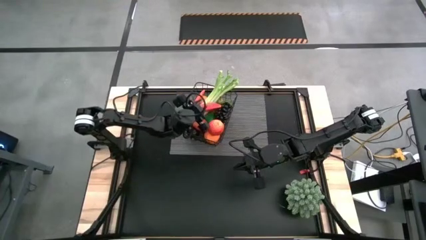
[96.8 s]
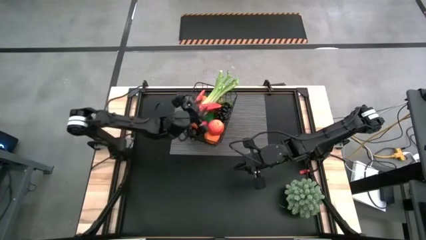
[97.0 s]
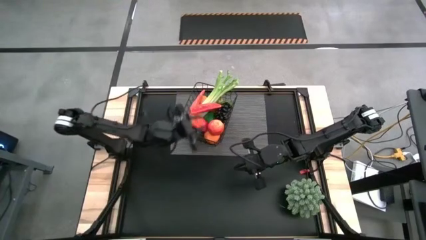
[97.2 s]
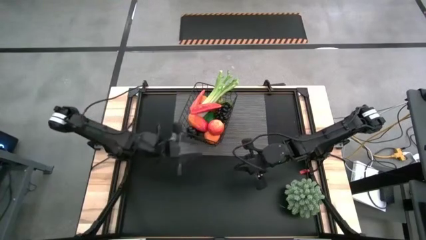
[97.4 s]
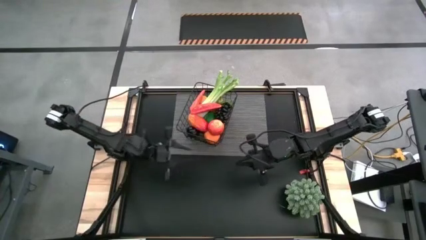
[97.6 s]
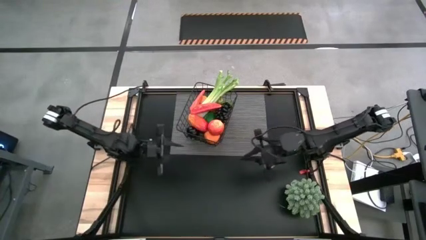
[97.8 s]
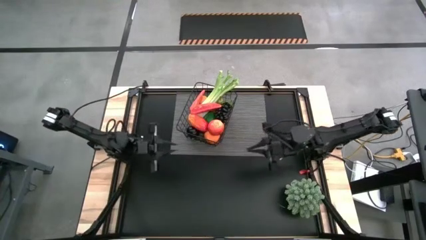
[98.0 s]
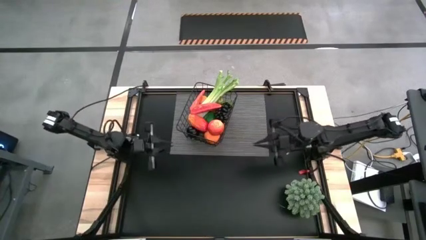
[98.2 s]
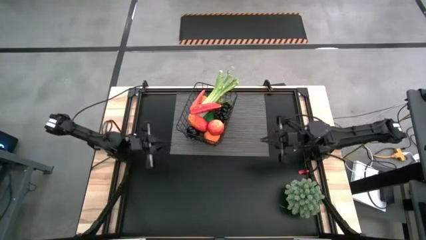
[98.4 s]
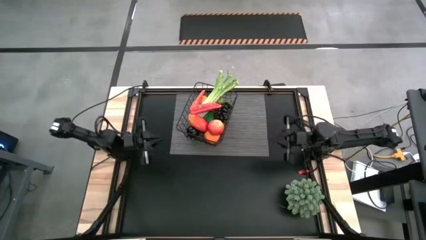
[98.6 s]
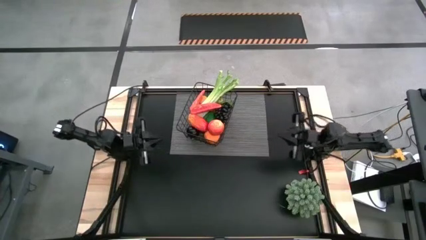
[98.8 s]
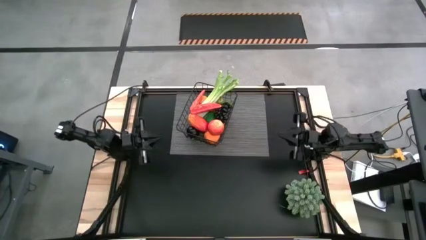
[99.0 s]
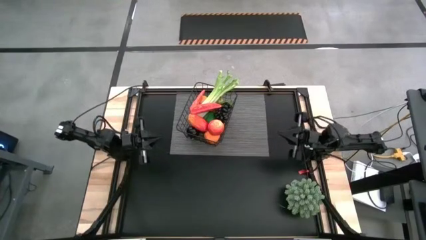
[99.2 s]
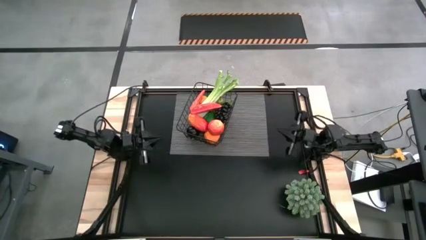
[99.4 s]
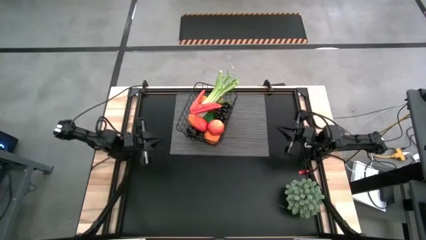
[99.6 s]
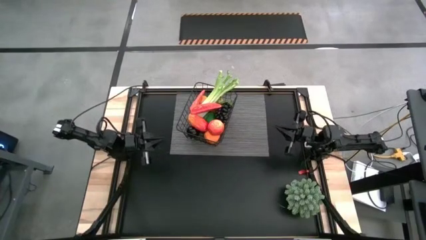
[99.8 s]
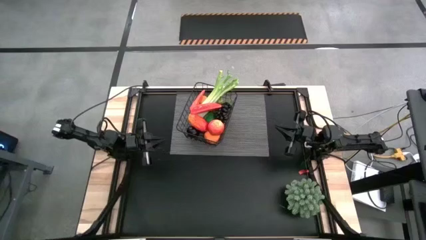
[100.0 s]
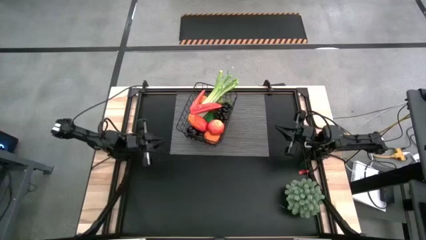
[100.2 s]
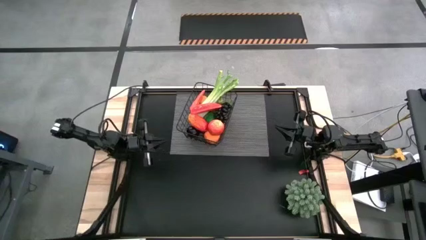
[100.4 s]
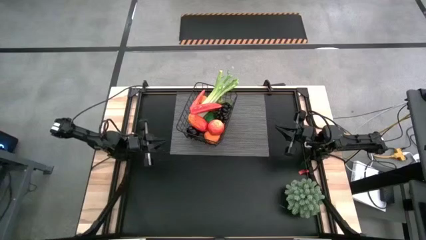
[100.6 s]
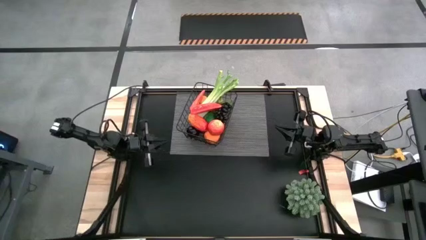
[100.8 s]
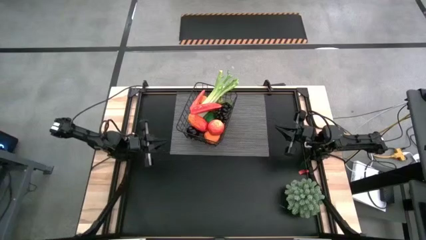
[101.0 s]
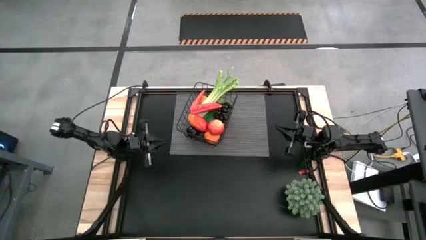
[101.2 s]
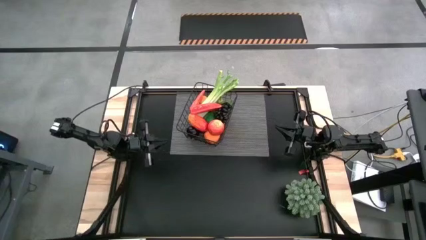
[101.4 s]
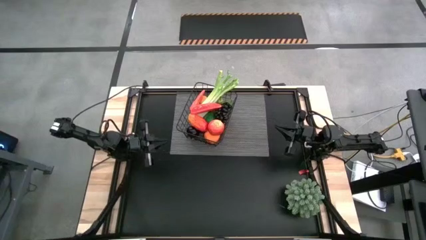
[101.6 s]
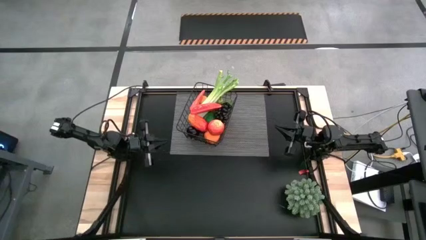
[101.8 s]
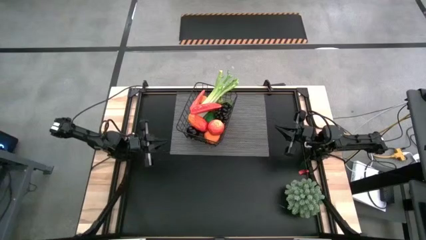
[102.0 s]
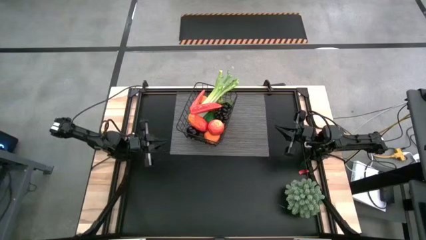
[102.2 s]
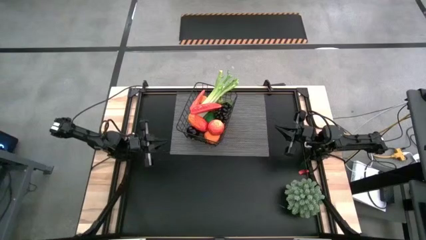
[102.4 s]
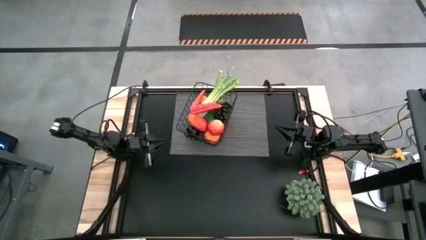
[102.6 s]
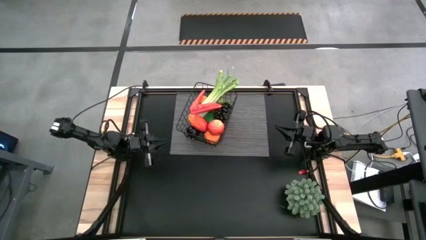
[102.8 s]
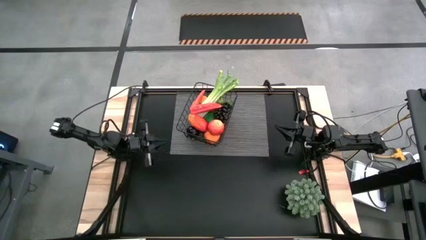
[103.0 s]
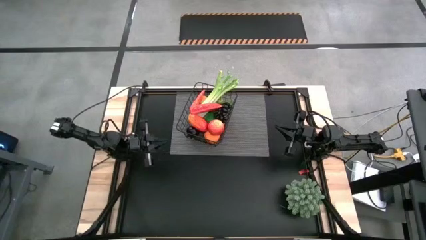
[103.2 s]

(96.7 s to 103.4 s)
Task: Build produce basket
Return To Home Position

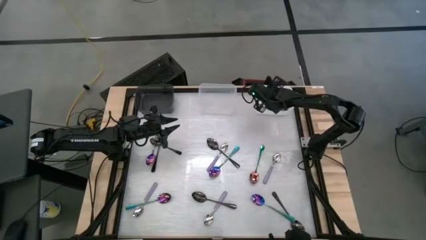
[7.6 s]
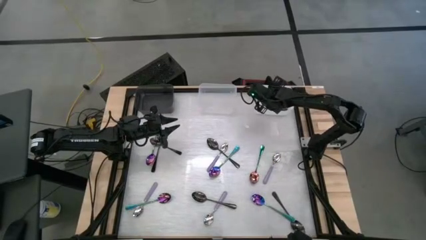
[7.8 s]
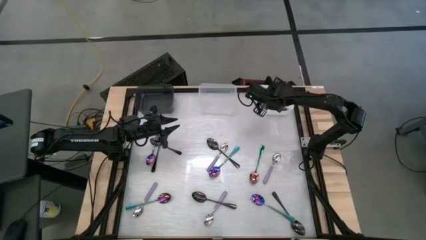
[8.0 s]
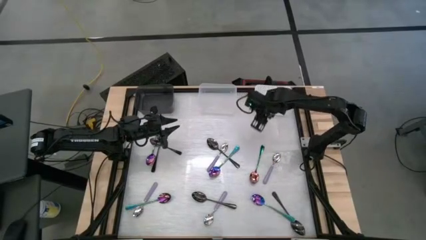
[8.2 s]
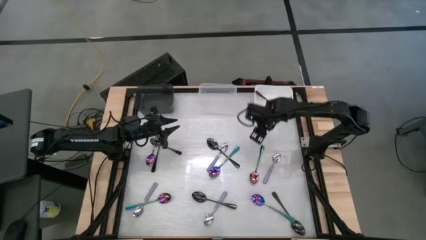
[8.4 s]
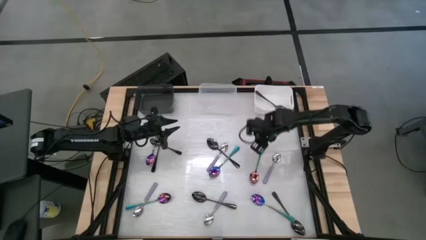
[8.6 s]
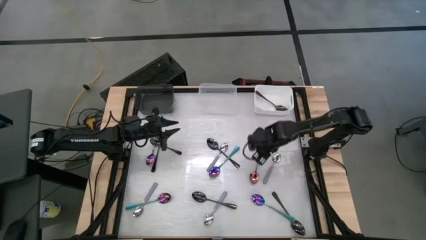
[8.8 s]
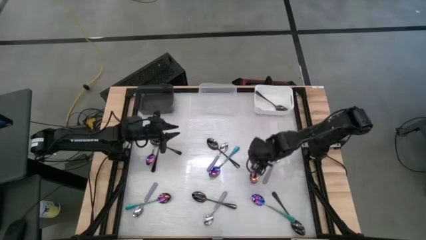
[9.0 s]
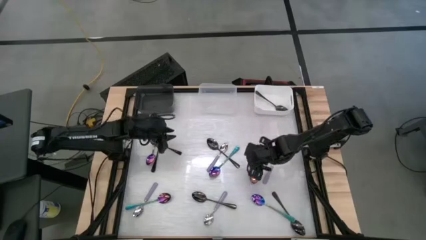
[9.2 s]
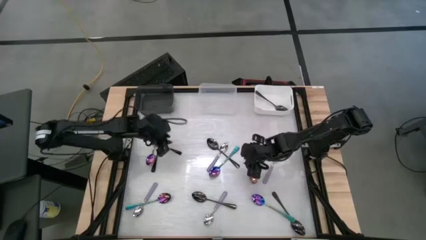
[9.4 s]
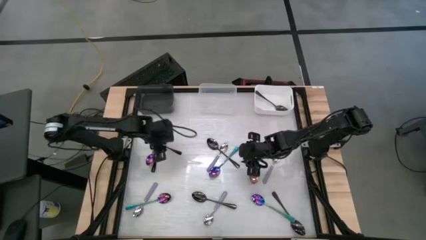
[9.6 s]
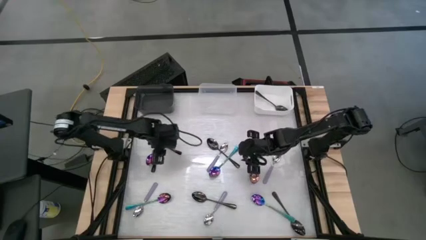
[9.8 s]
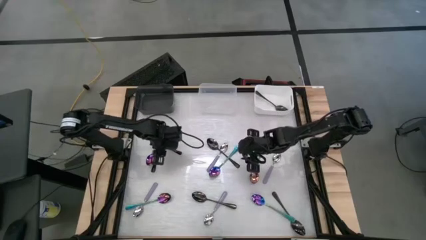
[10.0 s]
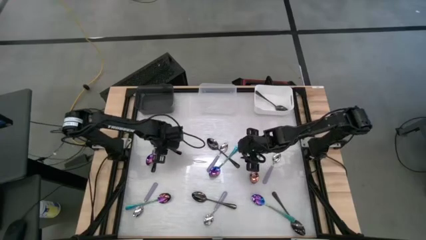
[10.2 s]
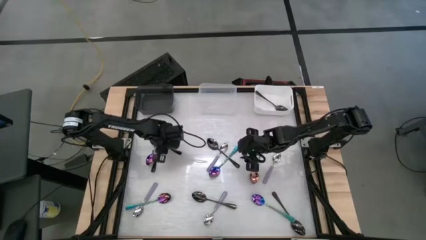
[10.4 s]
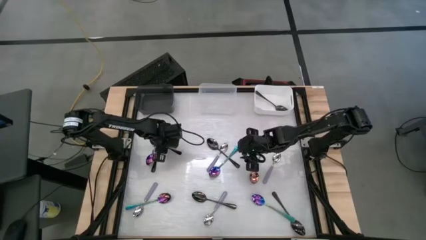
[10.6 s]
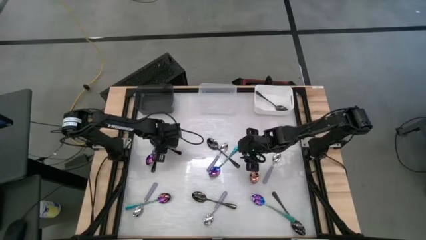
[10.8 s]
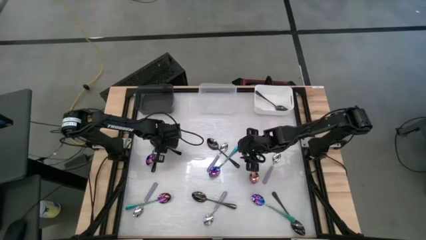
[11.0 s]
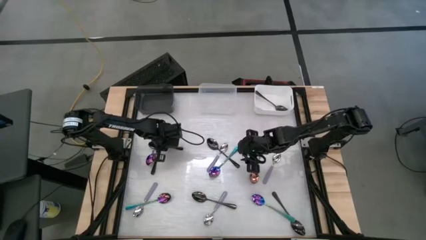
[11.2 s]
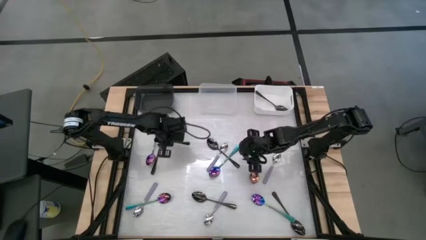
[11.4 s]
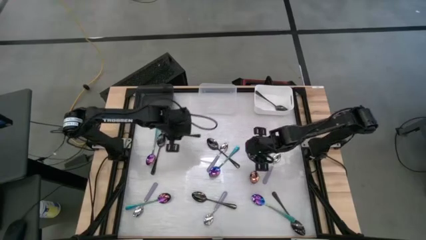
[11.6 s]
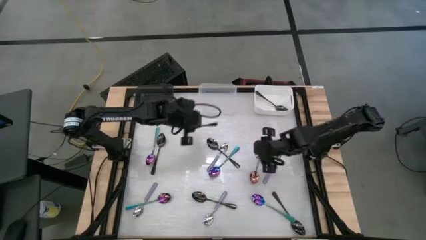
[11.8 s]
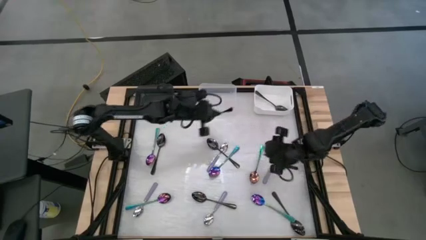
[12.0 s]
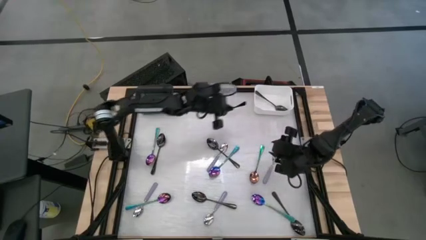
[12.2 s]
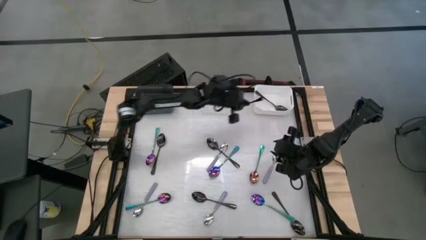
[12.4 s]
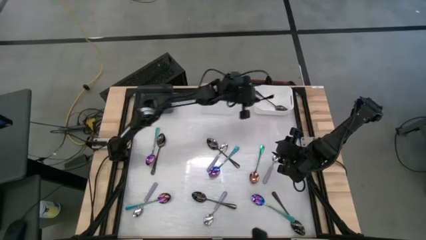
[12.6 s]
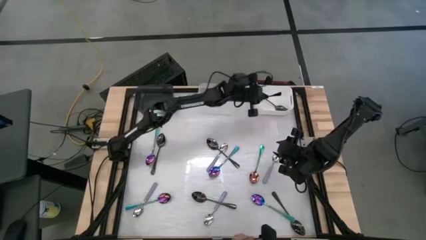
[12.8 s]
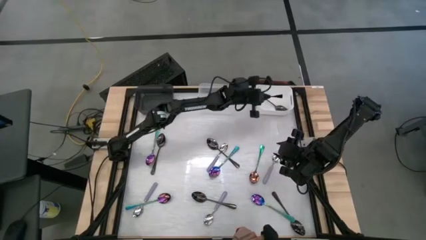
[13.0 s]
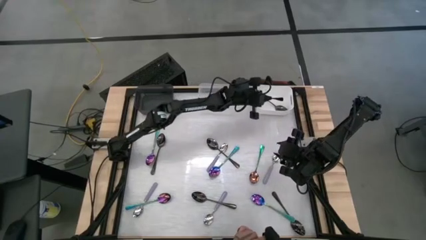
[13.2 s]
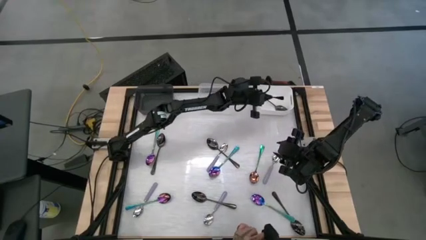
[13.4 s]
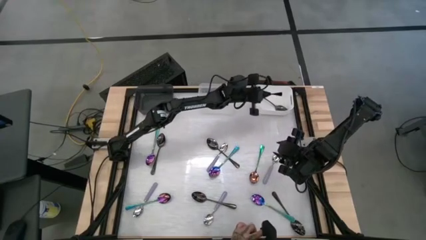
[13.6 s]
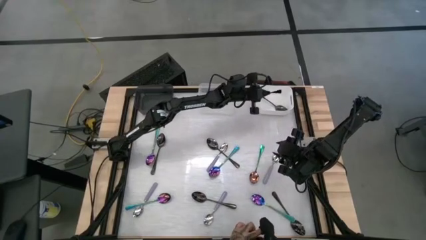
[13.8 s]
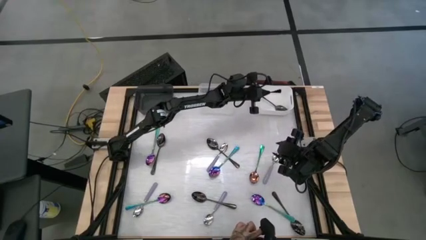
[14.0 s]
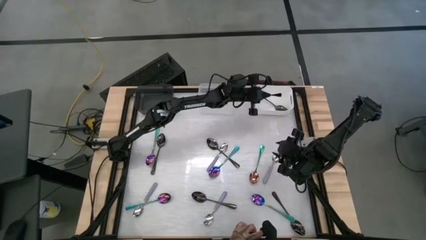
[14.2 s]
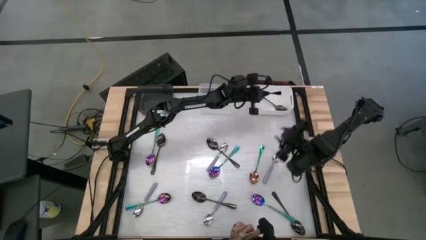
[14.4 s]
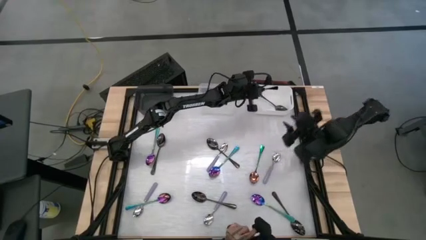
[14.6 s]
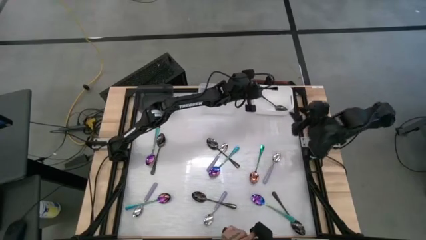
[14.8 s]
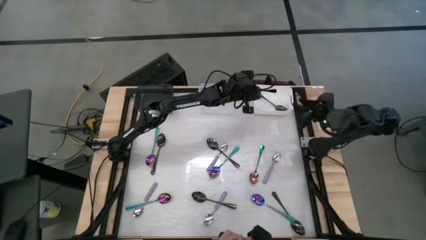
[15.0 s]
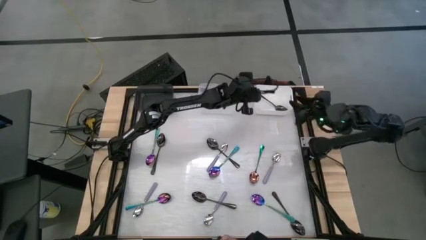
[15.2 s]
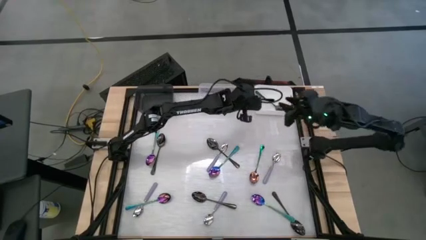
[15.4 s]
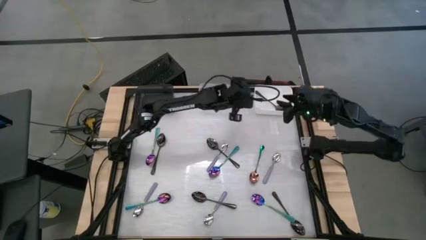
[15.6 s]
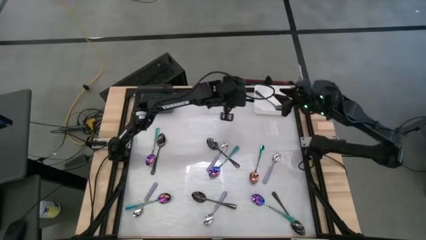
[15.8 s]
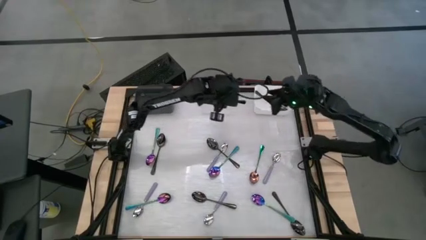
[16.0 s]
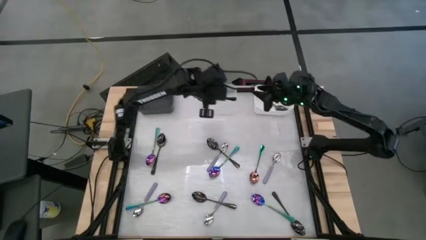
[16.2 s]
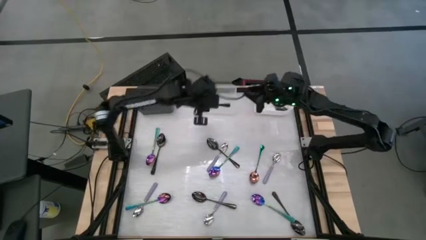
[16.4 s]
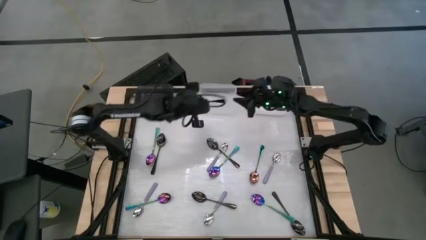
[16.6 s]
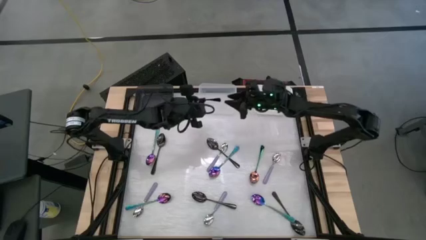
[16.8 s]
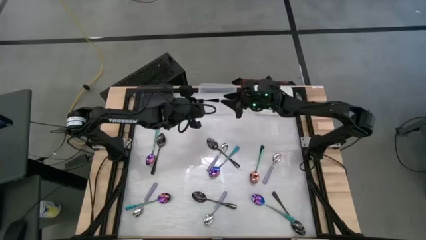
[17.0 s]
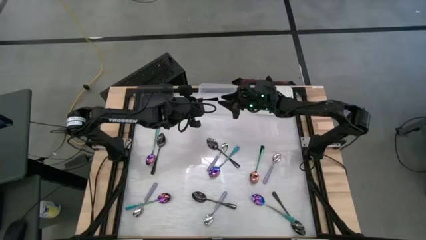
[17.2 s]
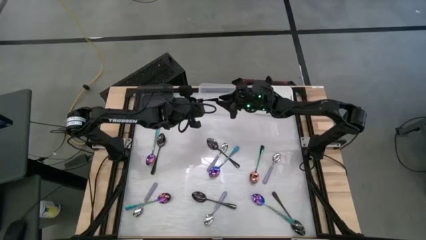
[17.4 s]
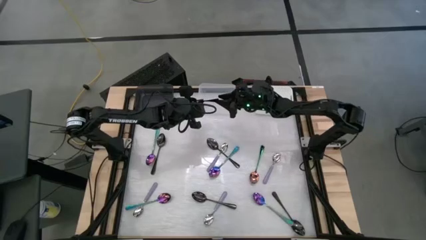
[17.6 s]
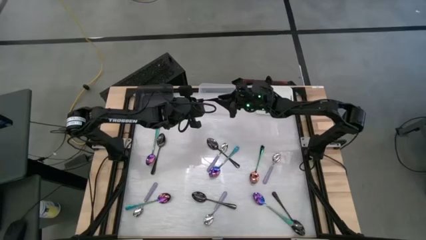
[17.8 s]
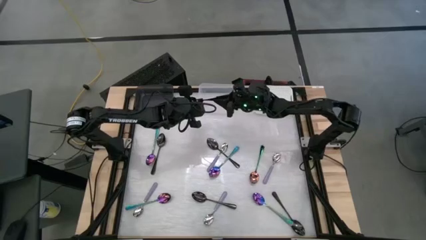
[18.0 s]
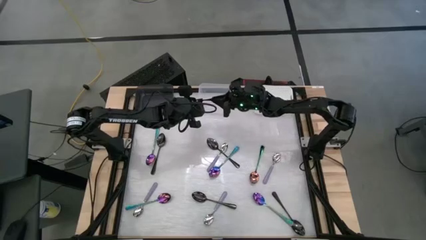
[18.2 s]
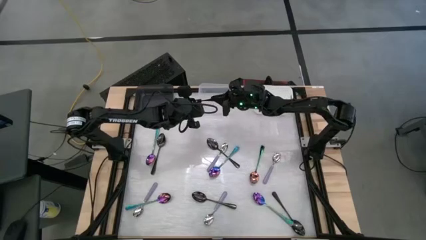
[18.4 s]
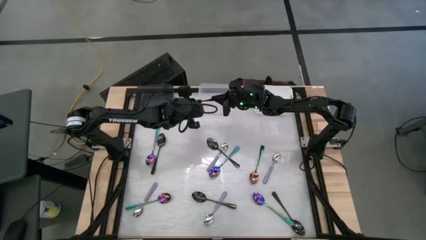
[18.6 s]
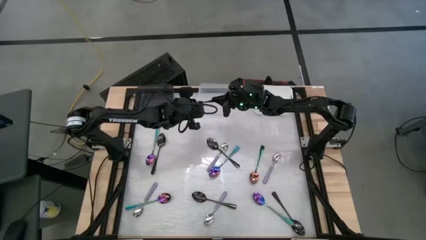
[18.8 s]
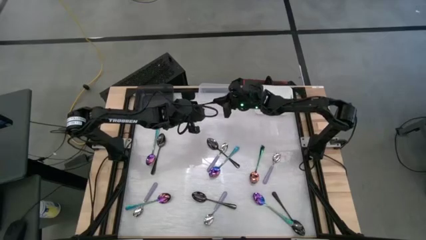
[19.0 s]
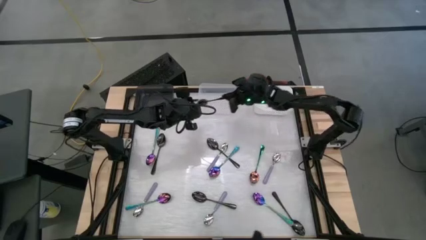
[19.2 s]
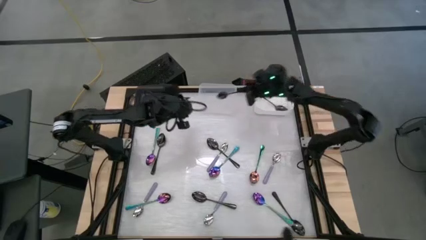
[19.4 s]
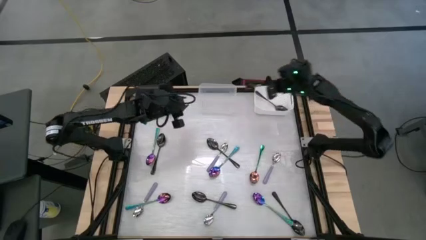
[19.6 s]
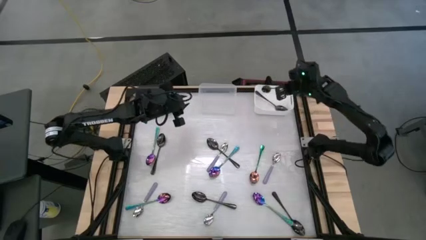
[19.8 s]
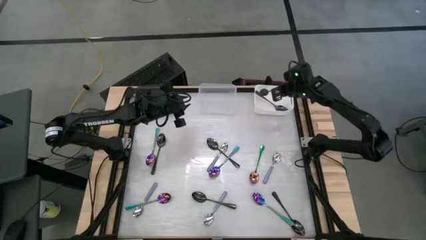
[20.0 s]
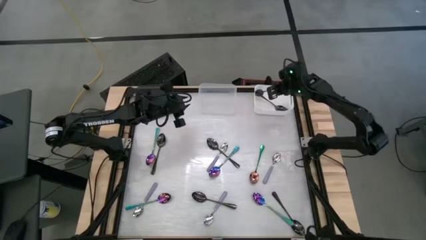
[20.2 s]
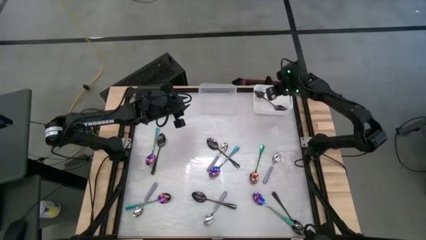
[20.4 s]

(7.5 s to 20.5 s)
Task: Sort silverware by color (type)
Put the black spoon into the white bin
